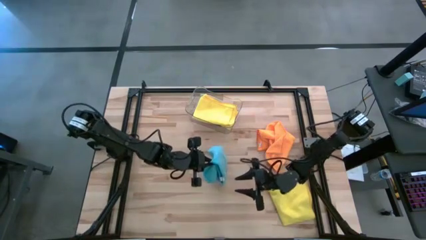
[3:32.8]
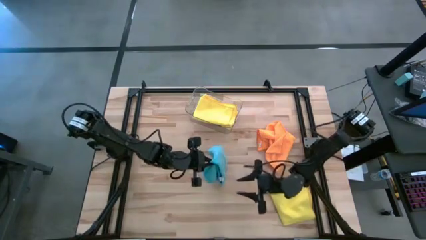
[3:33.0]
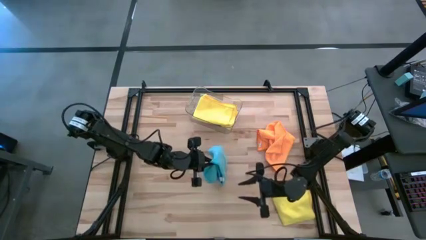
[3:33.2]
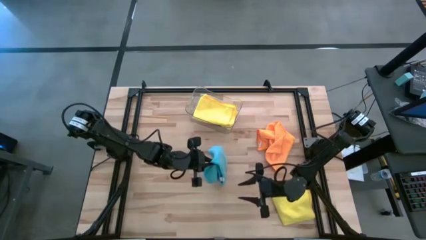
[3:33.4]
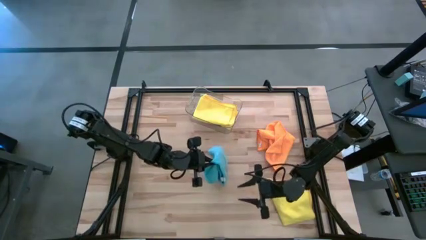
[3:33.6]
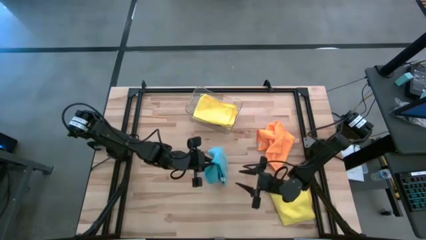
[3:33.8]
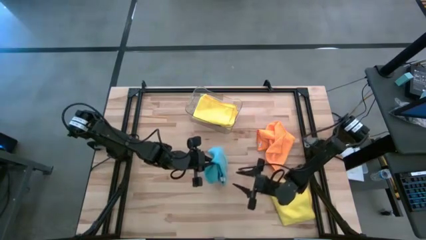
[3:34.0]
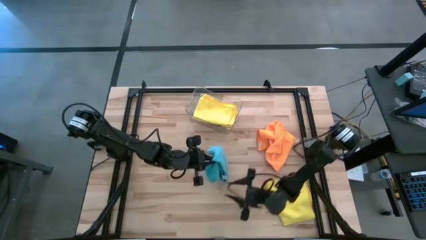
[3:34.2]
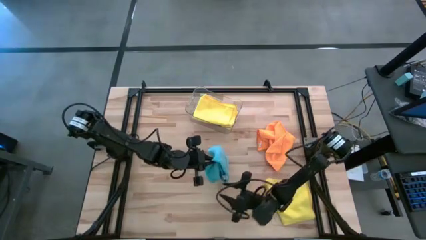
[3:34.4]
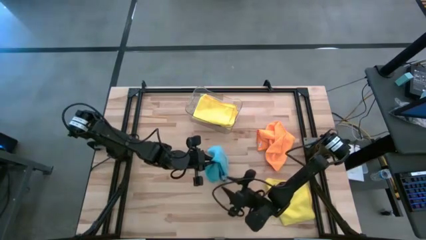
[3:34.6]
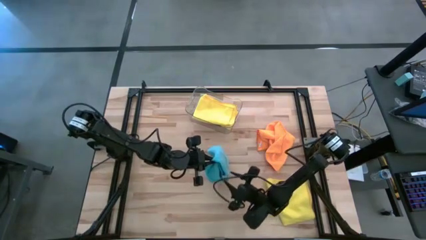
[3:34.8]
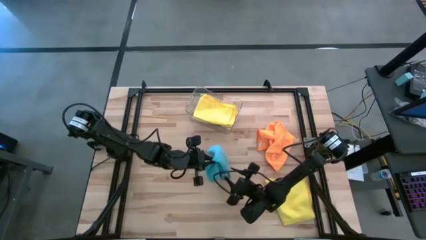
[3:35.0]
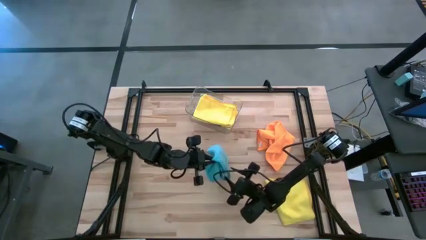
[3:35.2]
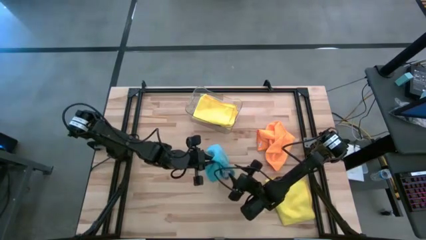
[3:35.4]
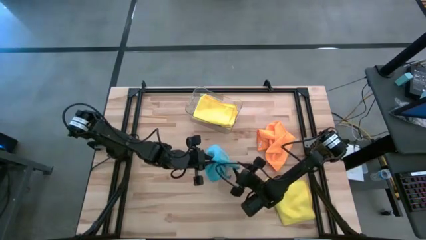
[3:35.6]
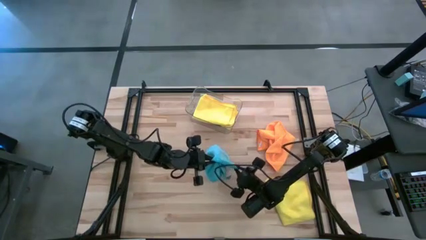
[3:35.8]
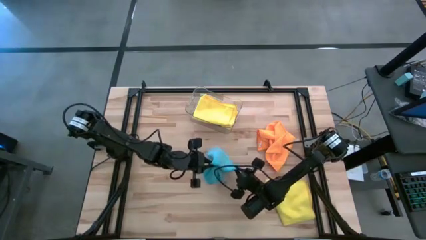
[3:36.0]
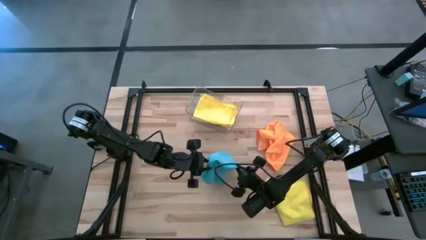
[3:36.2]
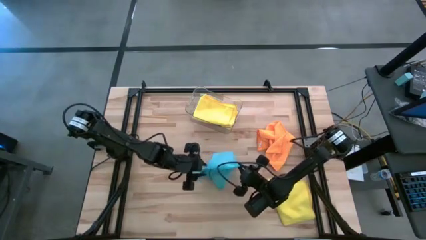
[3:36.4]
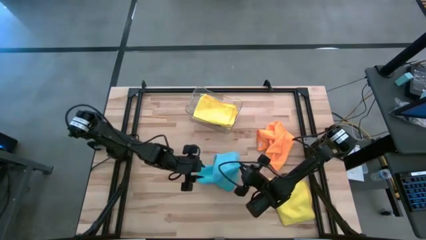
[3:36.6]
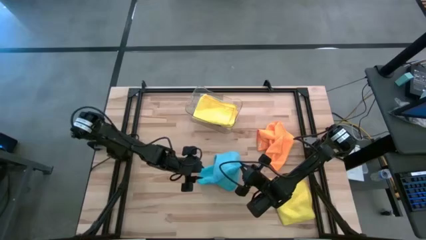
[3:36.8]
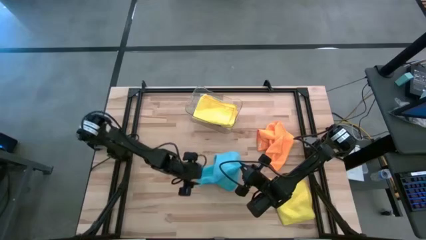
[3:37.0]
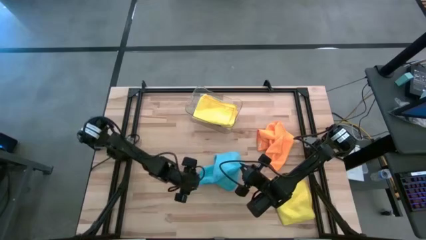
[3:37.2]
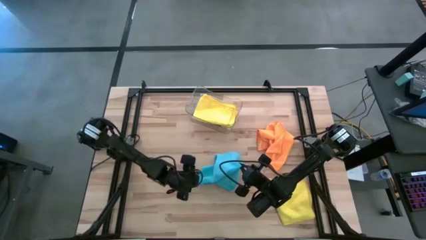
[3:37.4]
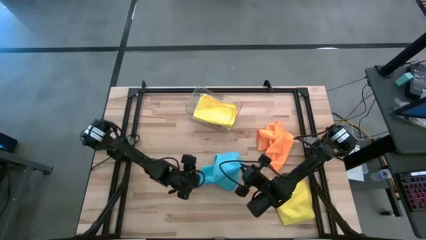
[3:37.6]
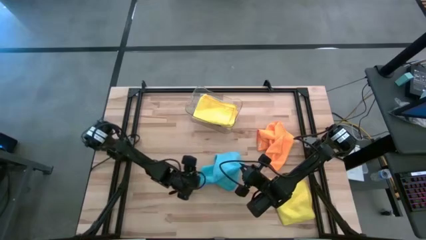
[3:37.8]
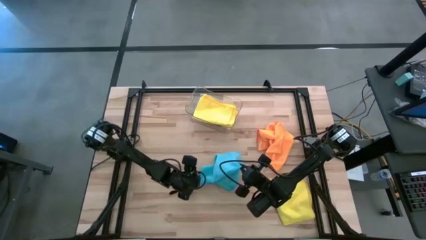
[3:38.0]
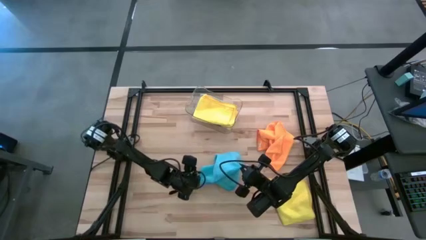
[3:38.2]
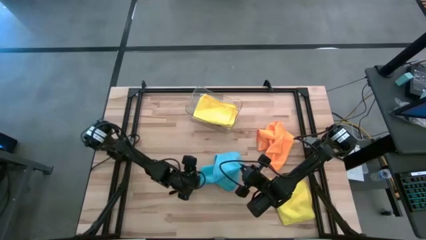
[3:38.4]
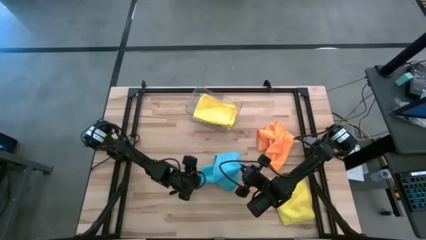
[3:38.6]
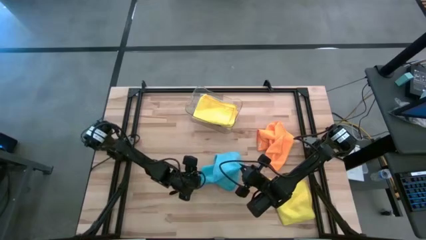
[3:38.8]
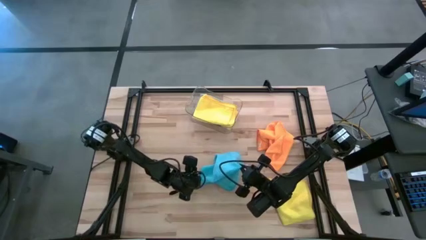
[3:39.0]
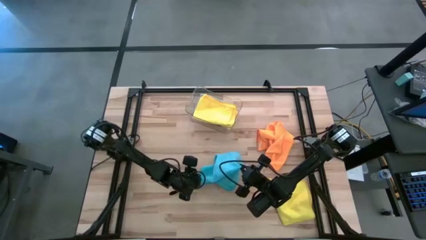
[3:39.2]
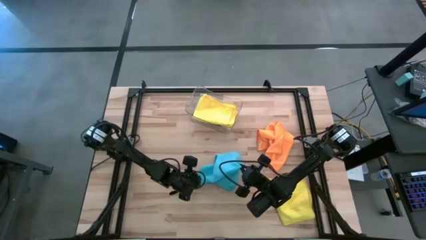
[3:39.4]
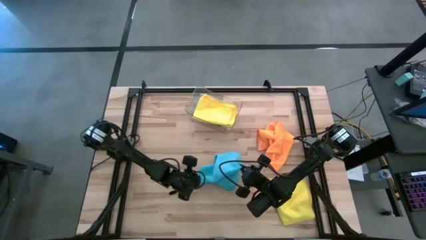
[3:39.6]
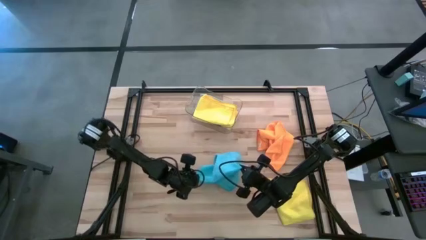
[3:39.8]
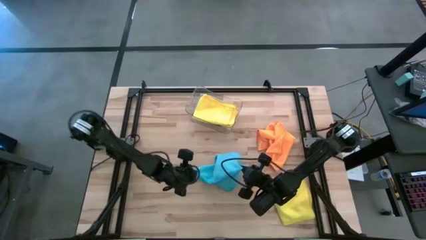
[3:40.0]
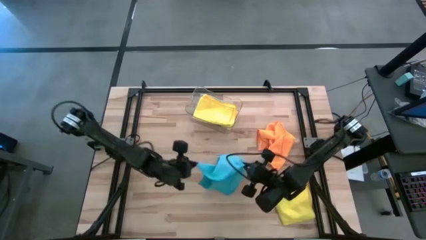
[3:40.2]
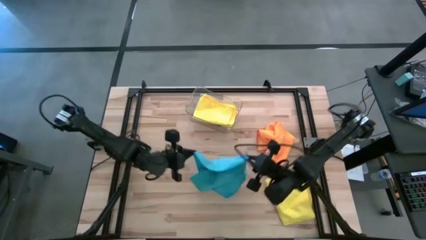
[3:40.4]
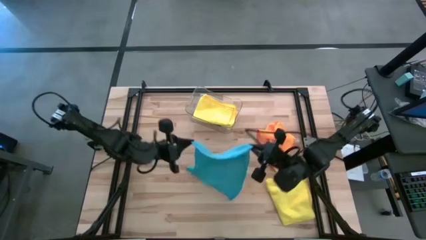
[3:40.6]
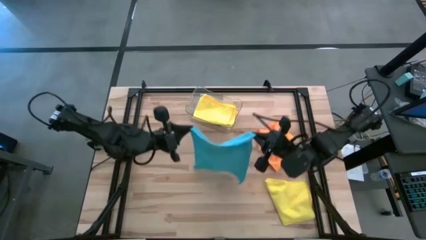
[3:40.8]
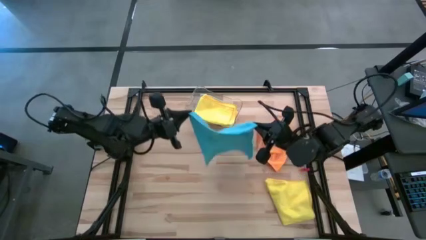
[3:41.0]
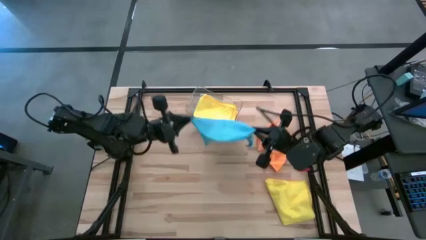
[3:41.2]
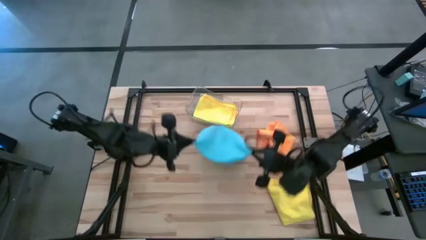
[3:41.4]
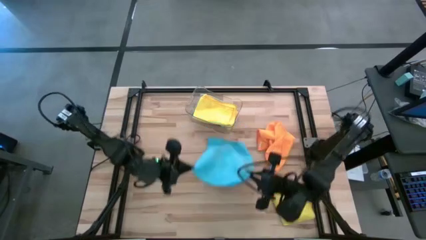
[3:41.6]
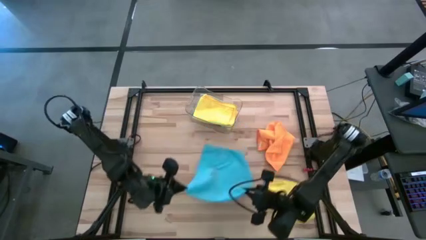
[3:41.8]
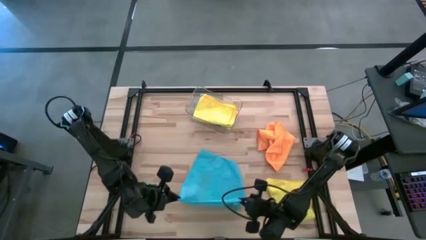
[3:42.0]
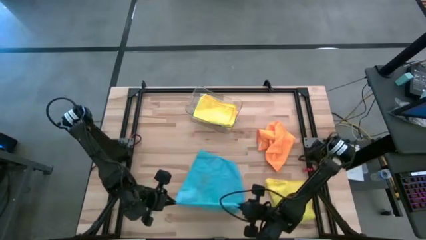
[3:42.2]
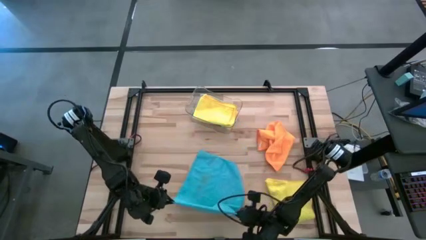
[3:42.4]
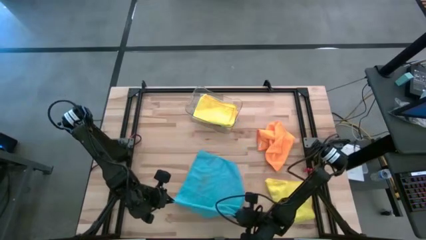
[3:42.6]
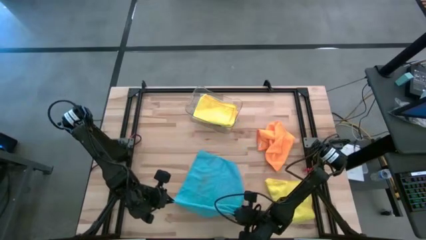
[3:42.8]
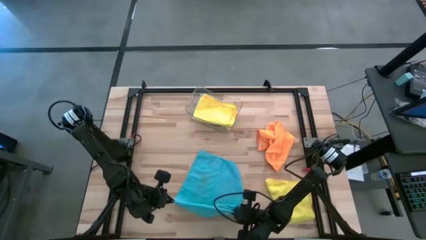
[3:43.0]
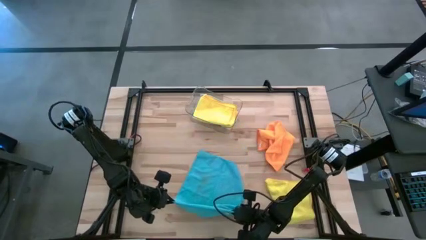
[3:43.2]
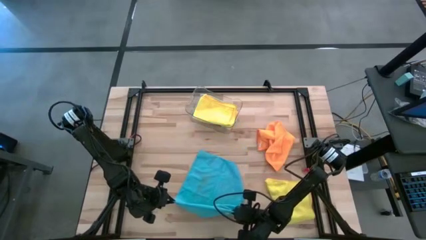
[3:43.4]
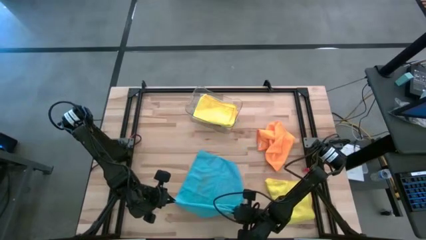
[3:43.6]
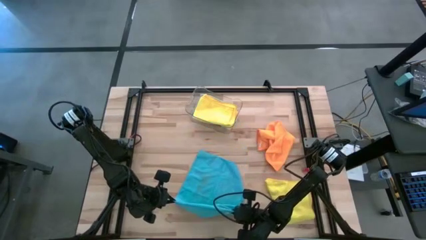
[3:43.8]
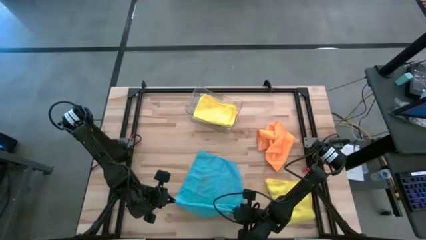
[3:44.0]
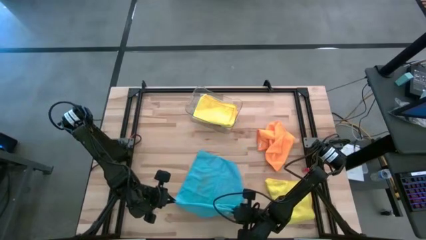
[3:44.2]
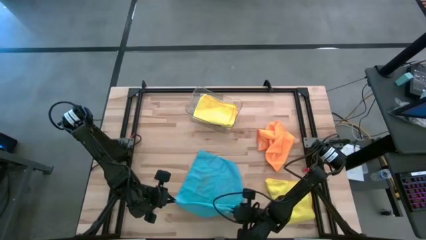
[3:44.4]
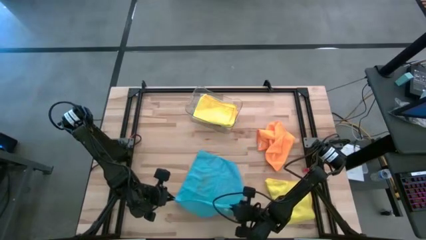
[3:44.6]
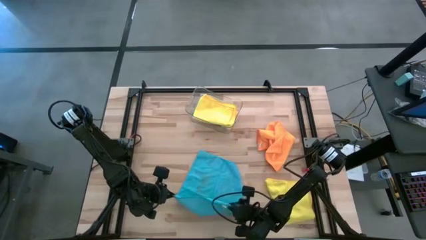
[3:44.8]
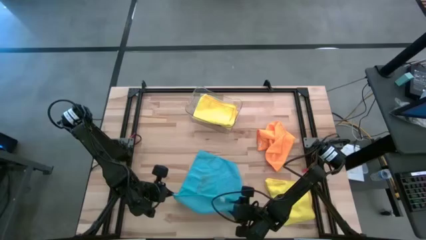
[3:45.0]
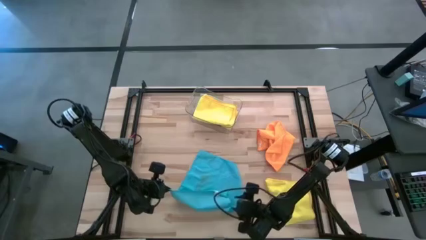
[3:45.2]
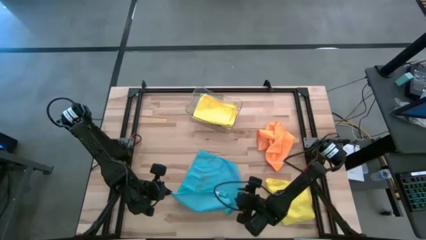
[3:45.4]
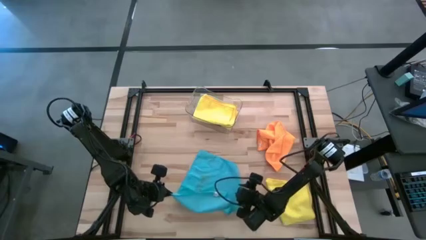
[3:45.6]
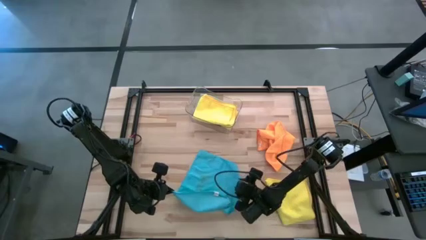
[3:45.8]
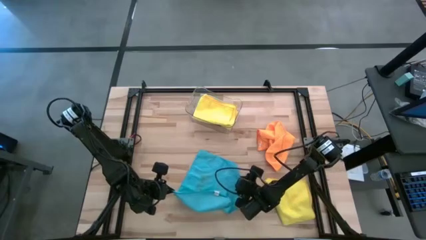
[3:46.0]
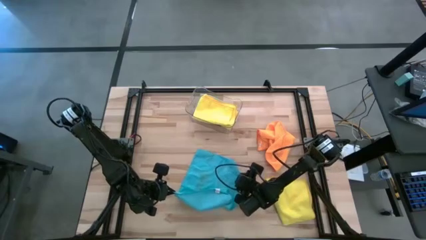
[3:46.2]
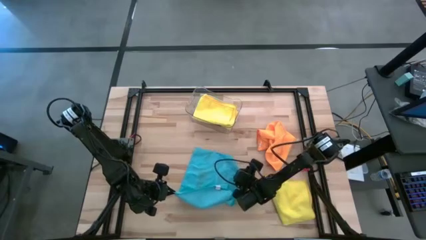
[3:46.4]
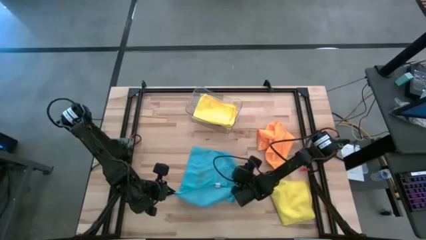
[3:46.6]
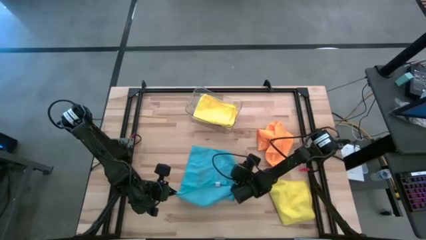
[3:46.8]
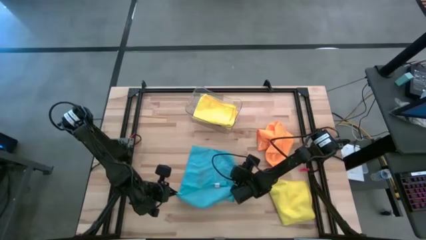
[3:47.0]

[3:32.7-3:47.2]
Task: Fold microfiber towels
Fold the blue microfiber cloth
